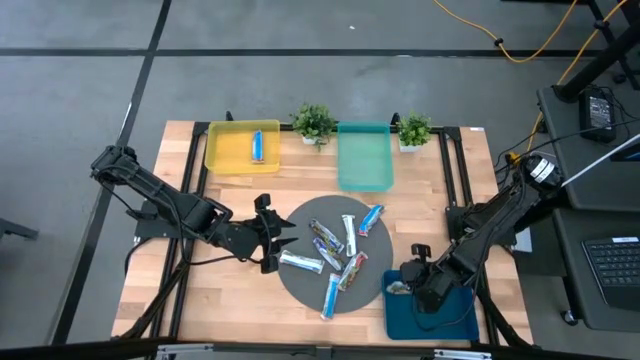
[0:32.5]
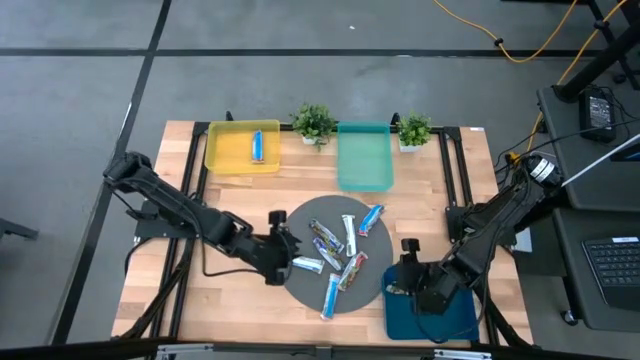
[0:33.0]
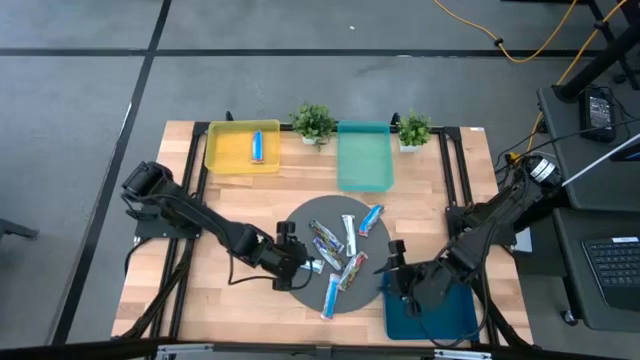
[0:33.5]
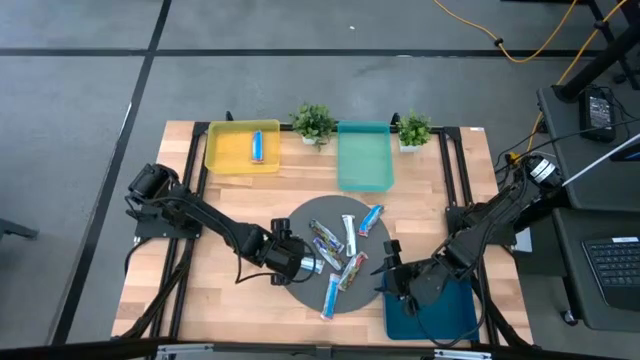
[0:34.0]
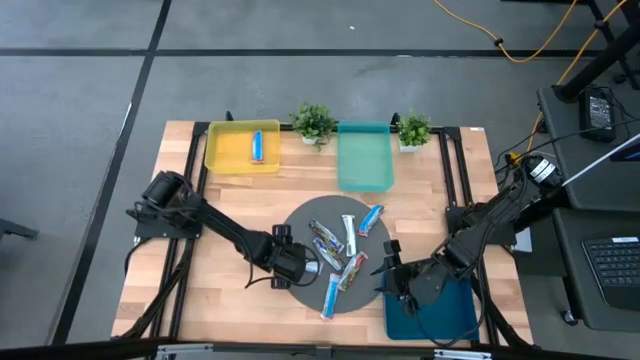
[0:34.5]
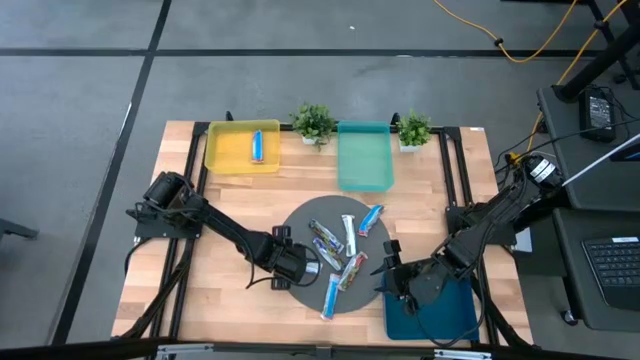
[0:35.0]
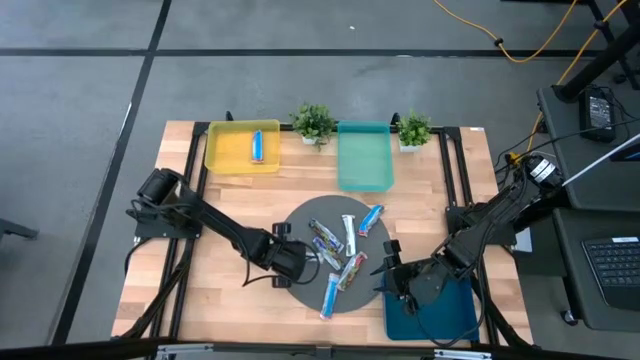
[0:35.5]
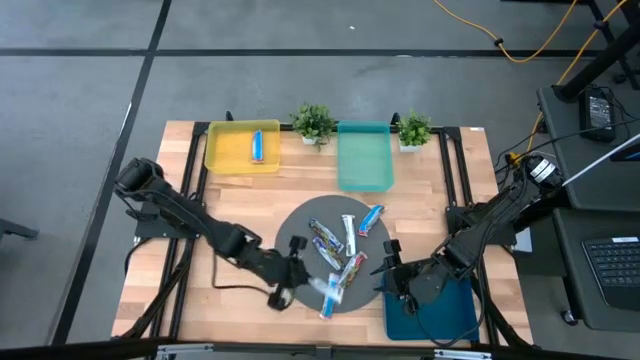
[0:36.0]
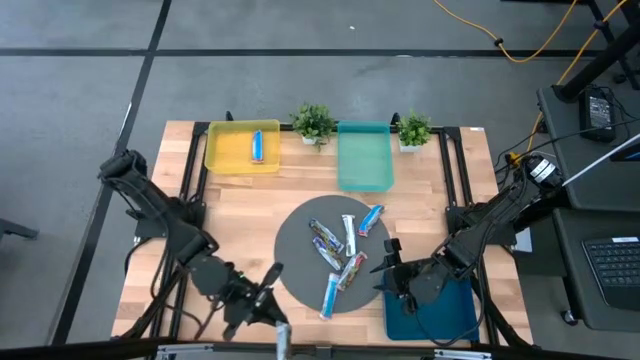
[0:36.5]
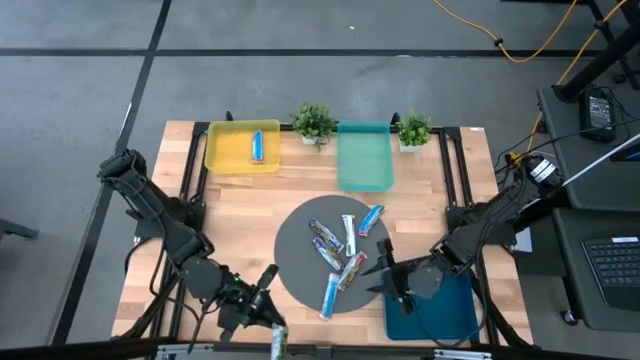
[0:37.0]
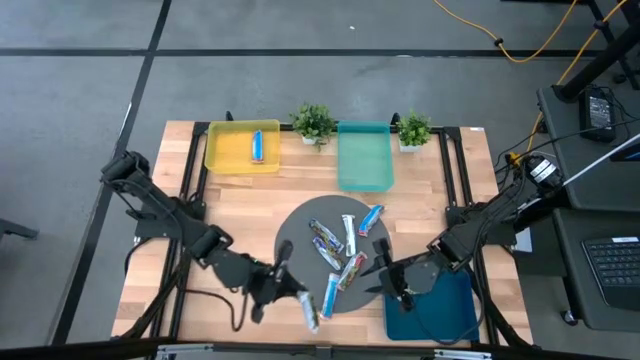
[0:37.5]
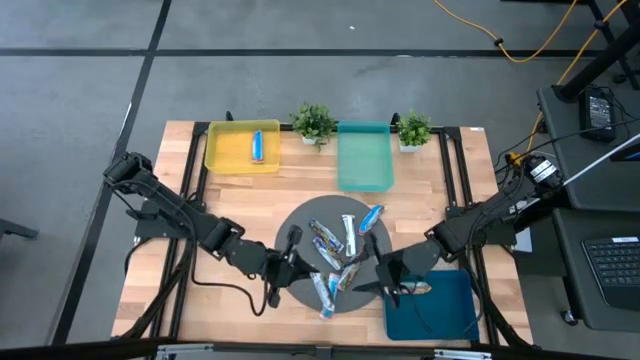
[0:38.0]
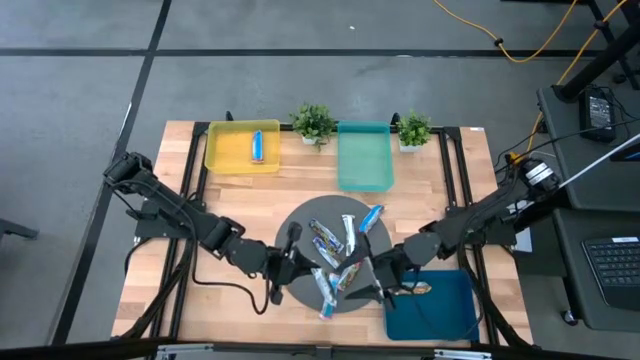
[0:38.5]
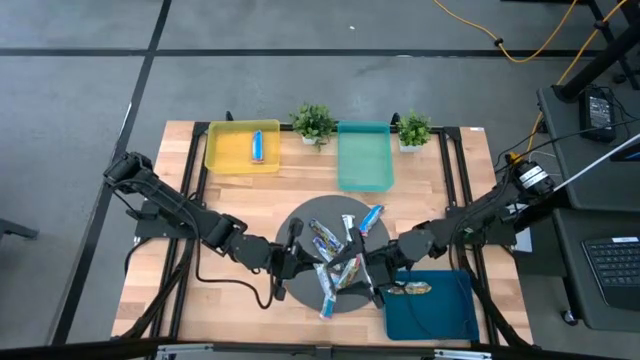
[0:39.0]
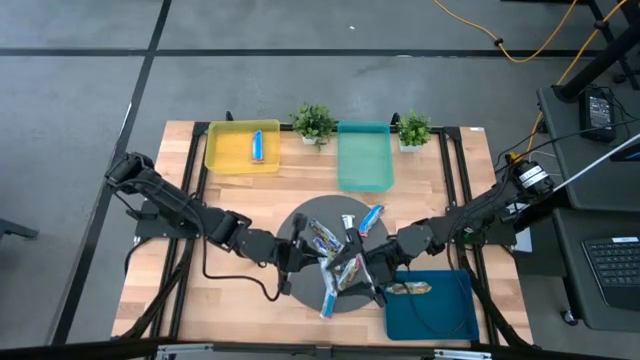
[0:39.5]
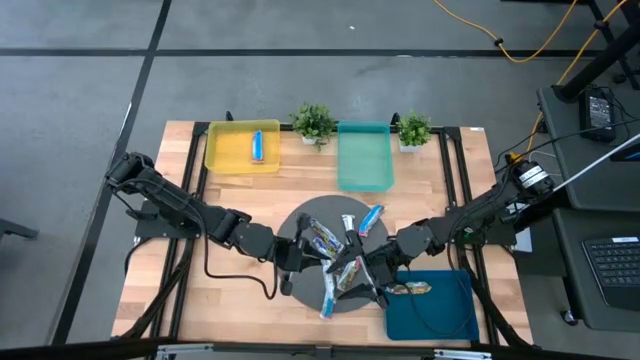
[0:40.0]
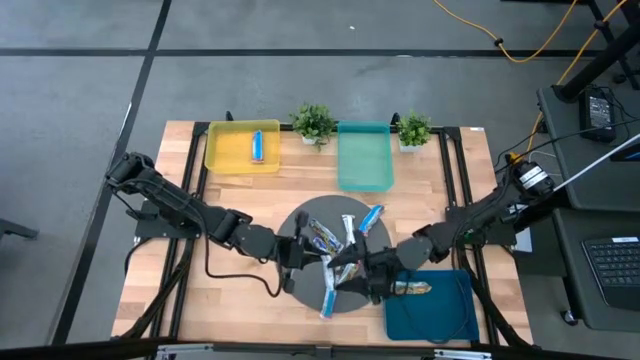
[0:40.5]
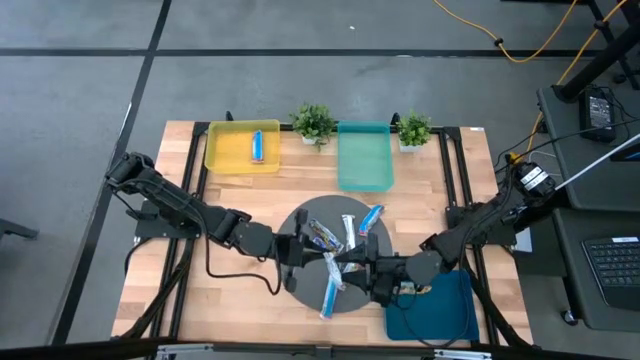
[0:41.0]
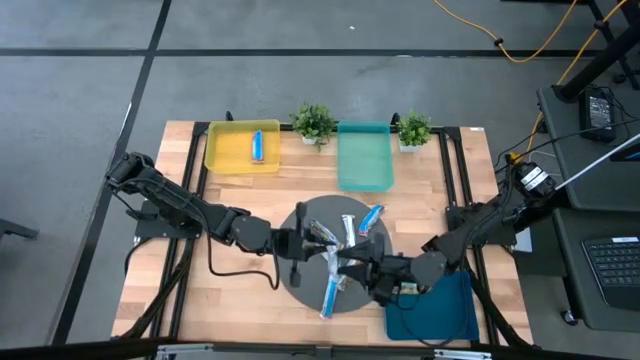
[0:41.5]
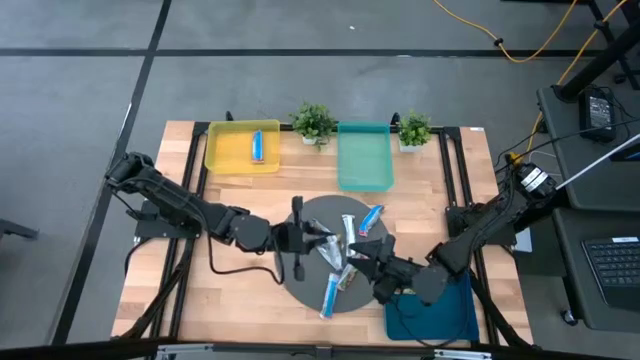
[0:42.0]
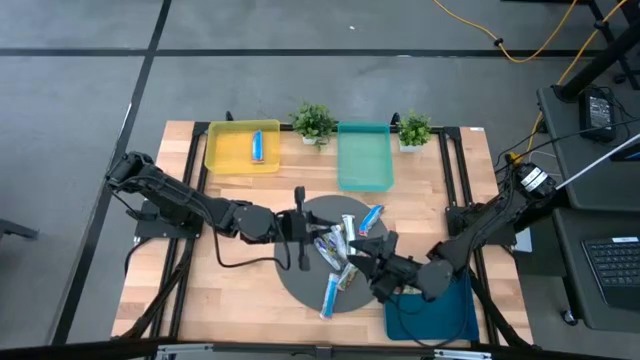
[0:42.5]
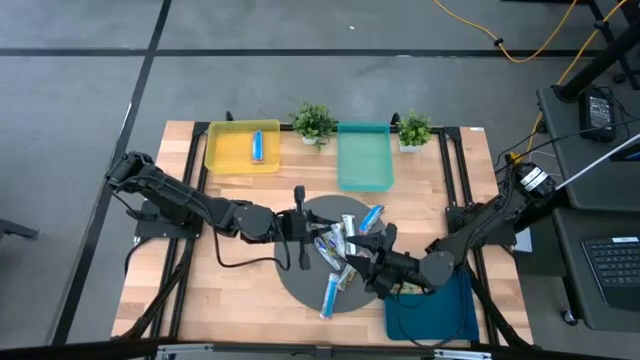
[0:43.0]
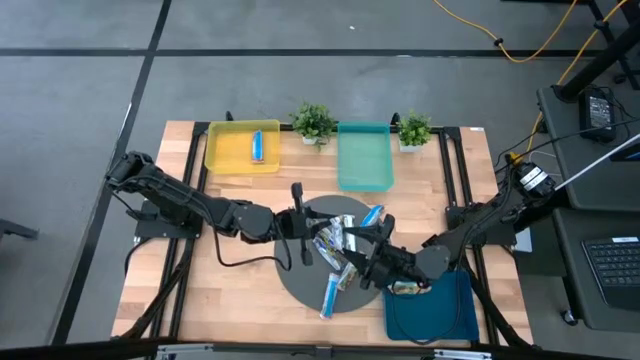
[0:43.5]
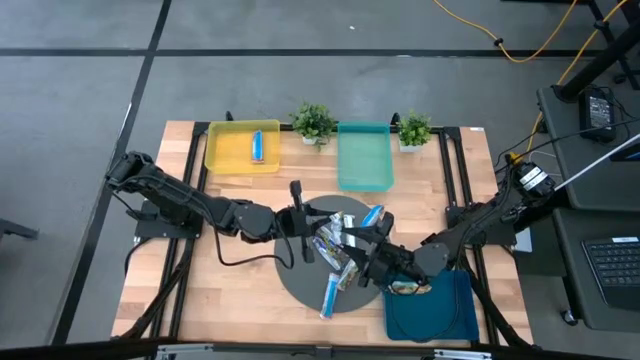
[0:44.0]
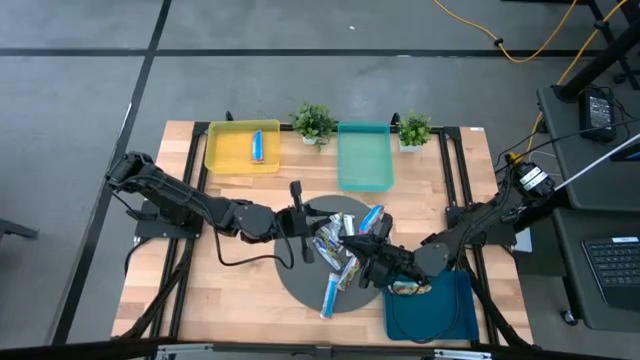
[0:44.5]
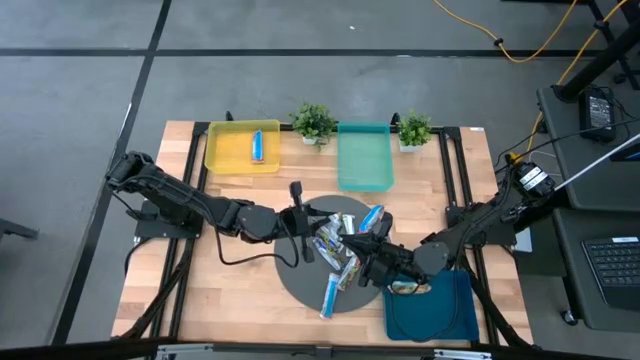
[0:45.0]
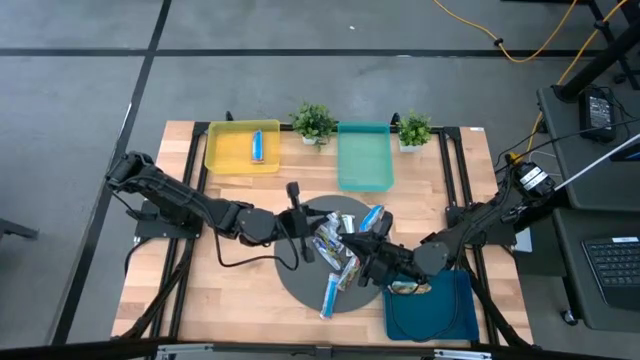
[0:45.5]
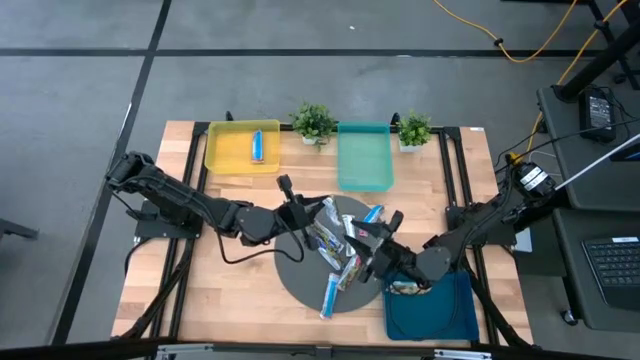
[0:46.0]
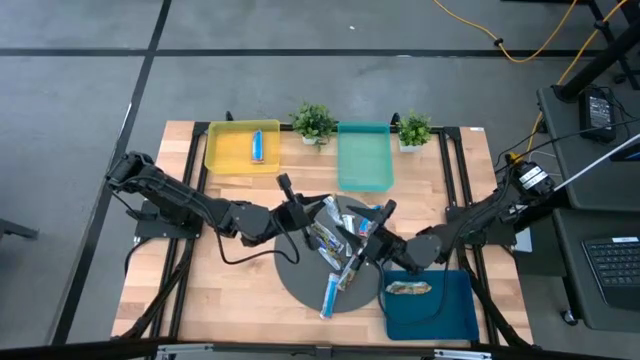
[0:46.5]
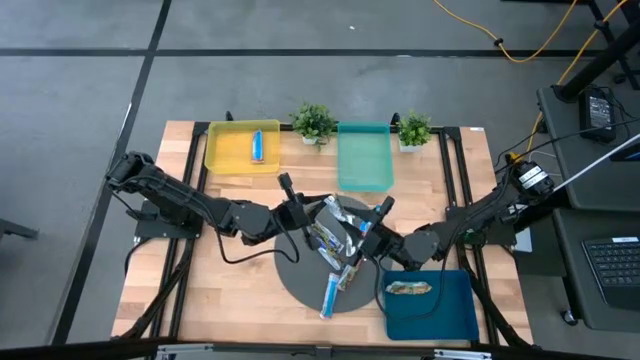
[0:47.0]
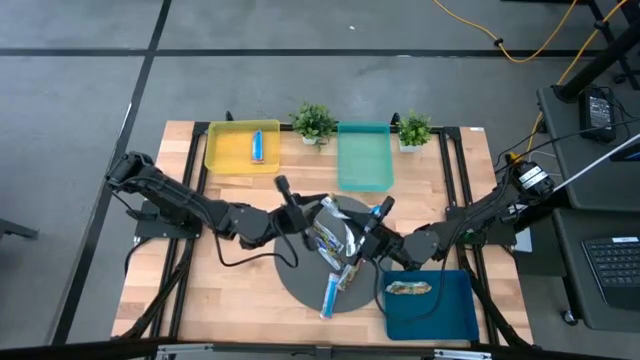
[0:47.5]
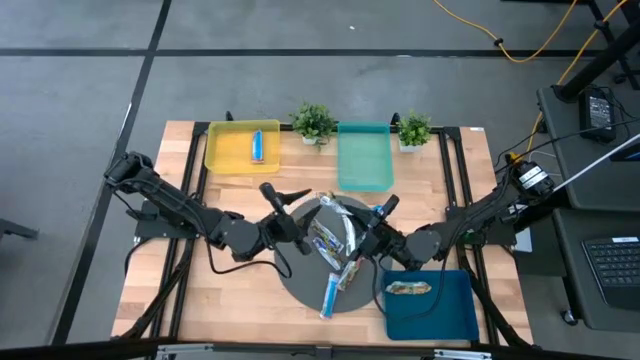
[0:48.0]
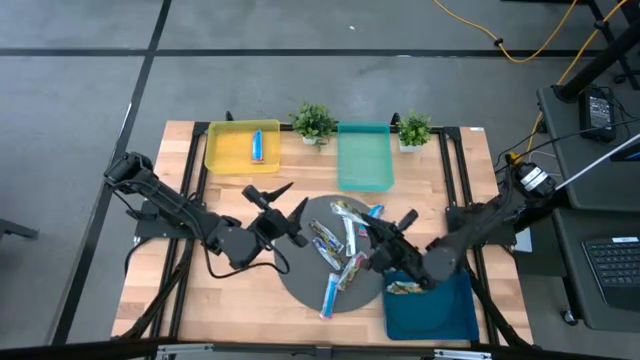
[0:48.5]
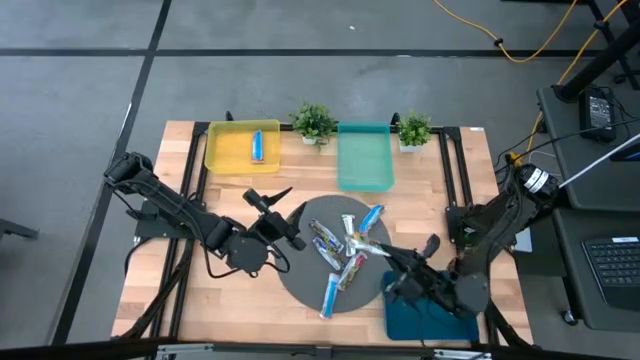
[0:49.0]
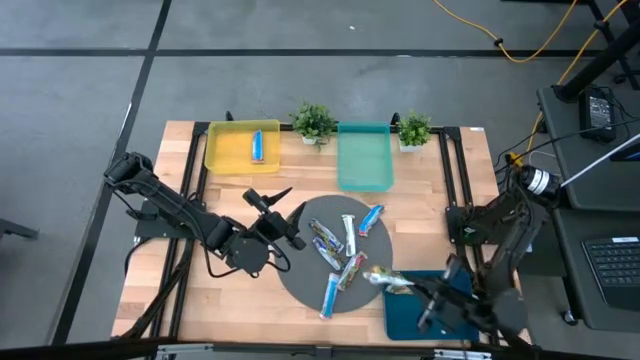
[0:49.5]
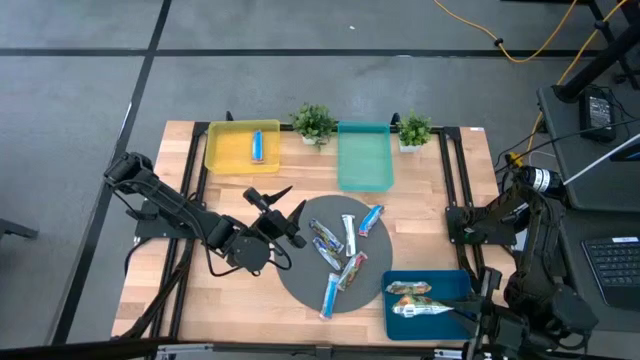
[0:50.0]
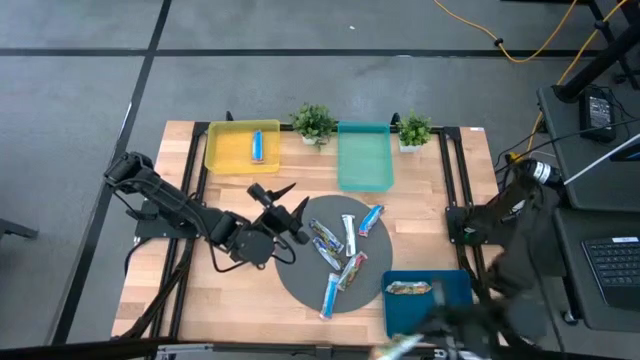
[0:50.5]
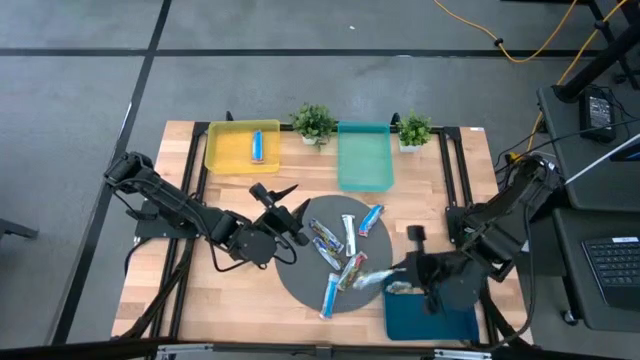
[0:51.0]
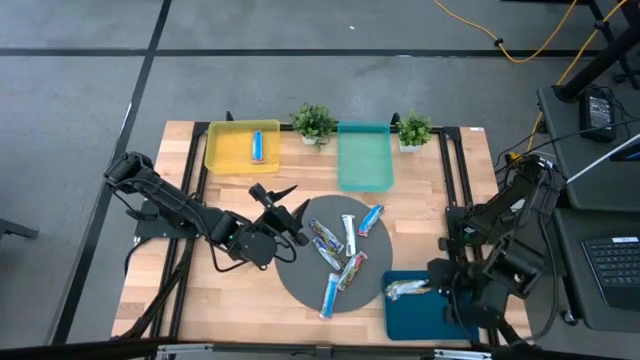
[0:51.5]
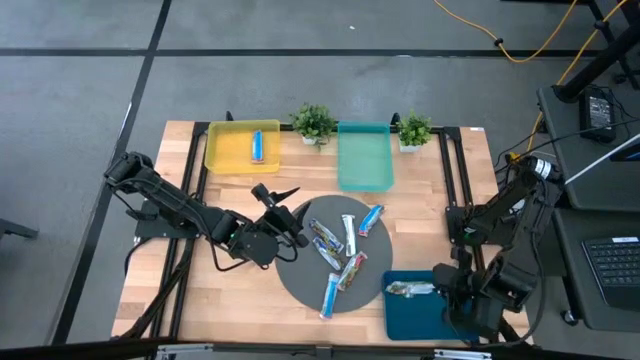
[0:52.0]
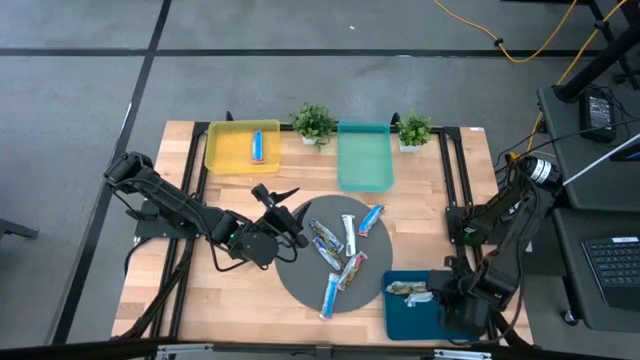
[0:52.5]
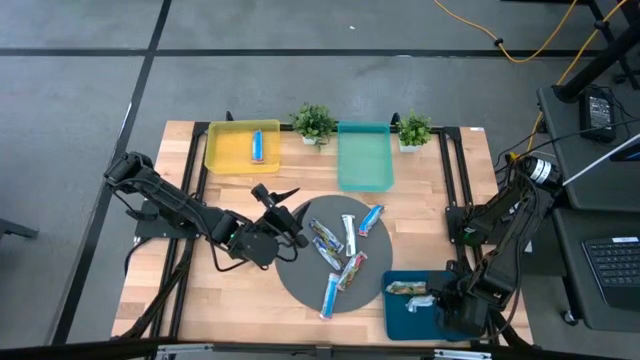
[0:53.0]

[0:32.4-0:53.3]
Task: Pick and place Granola Bars by type
Put the yellow granola bar into the blue bin
